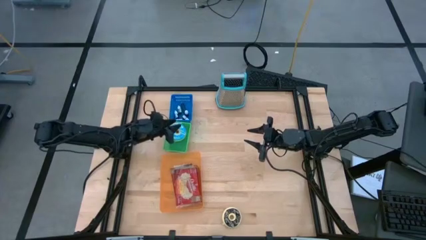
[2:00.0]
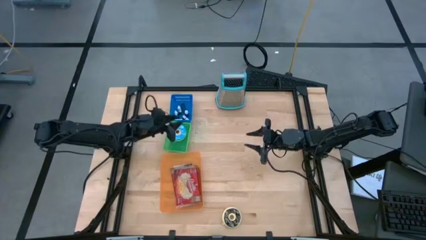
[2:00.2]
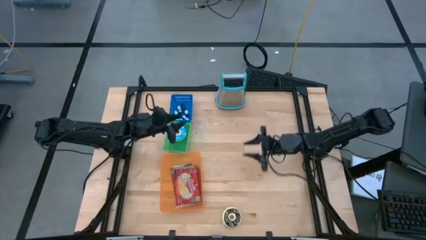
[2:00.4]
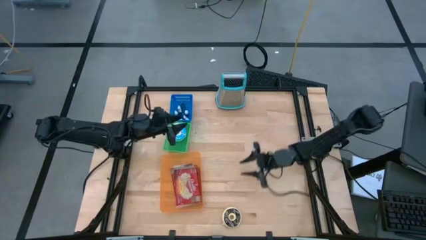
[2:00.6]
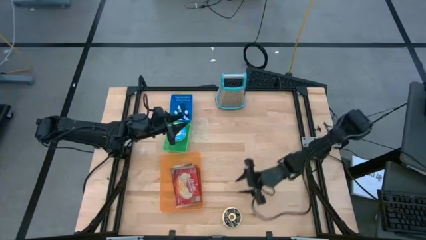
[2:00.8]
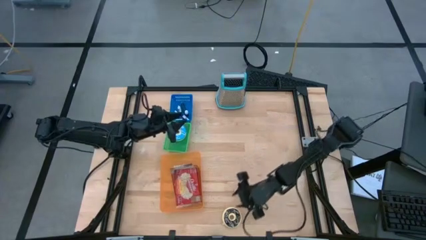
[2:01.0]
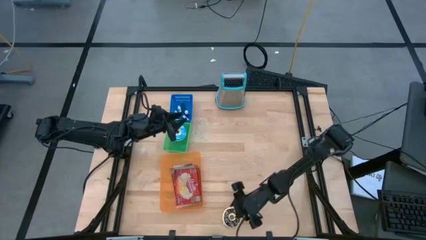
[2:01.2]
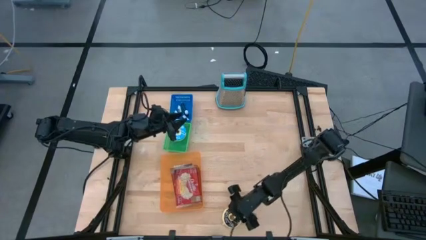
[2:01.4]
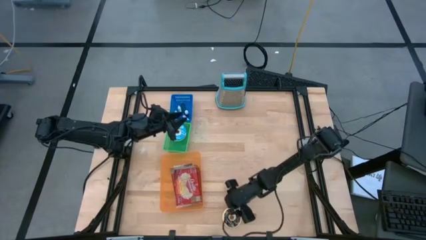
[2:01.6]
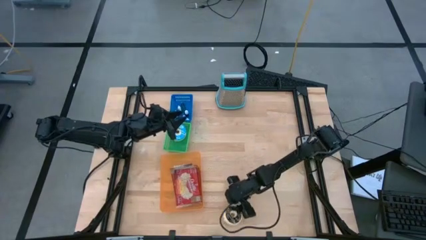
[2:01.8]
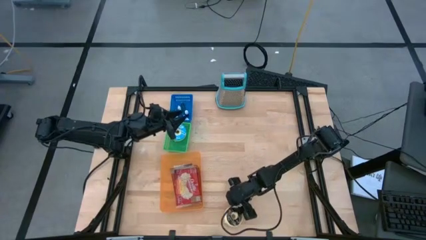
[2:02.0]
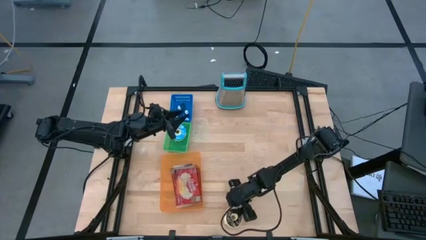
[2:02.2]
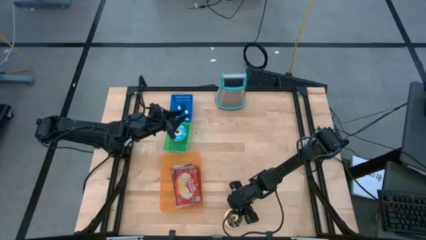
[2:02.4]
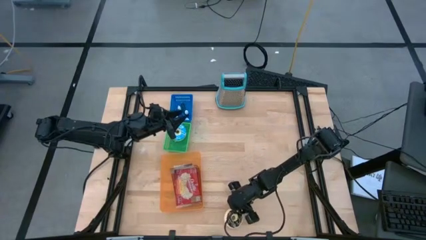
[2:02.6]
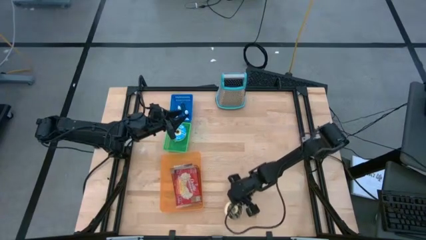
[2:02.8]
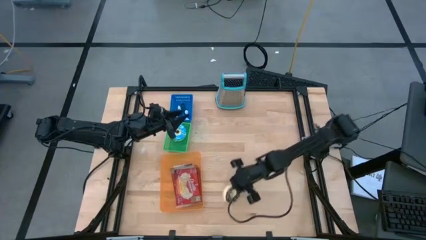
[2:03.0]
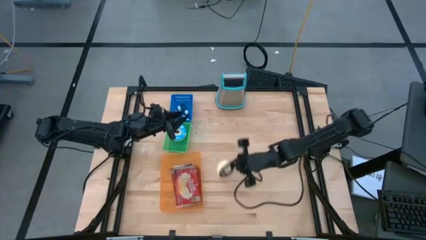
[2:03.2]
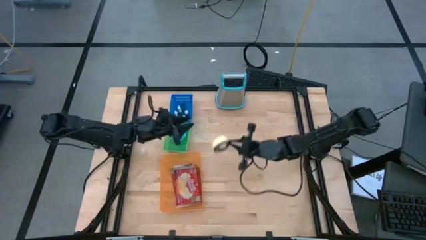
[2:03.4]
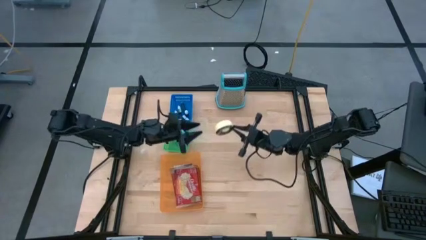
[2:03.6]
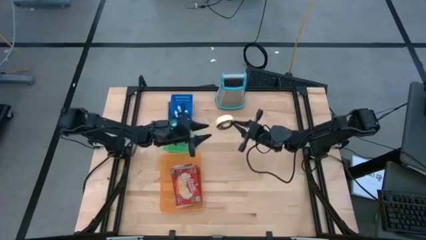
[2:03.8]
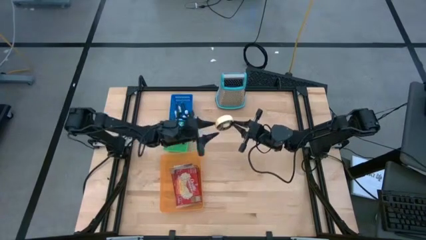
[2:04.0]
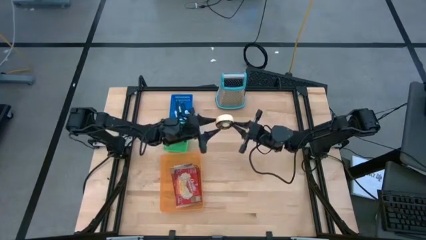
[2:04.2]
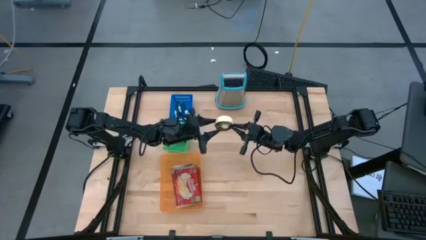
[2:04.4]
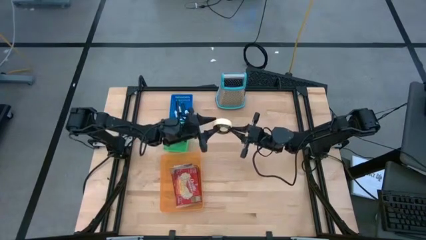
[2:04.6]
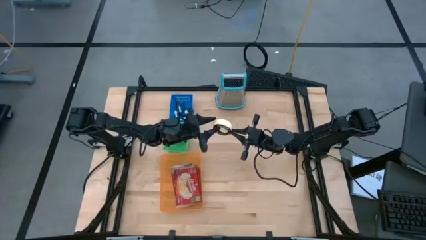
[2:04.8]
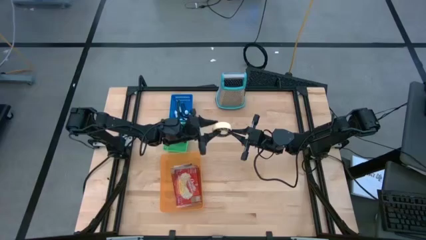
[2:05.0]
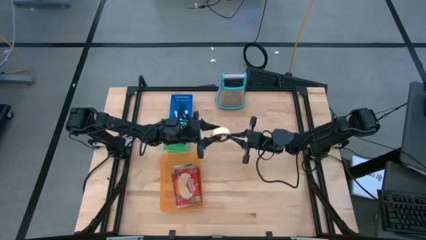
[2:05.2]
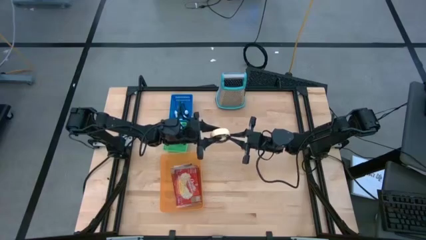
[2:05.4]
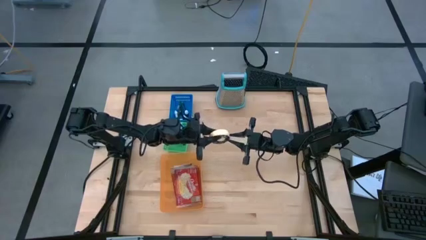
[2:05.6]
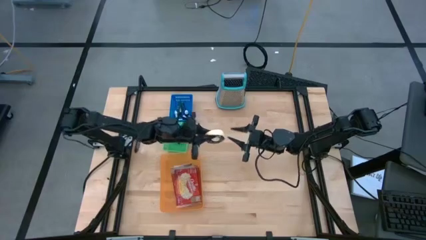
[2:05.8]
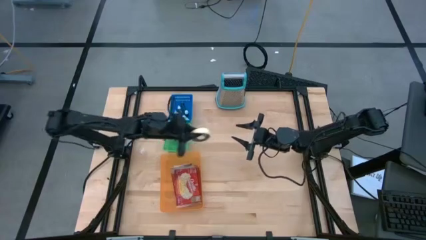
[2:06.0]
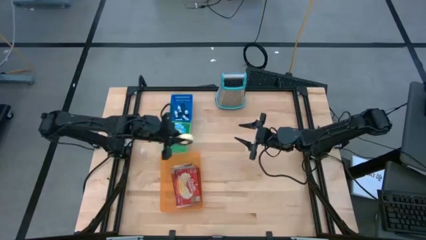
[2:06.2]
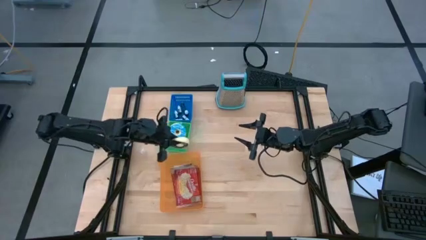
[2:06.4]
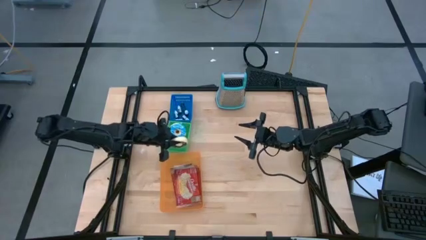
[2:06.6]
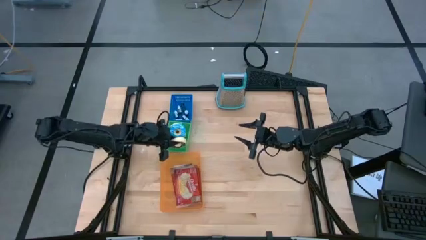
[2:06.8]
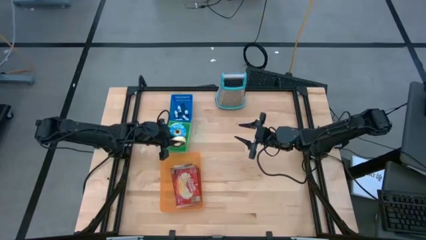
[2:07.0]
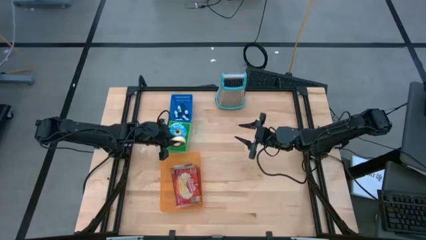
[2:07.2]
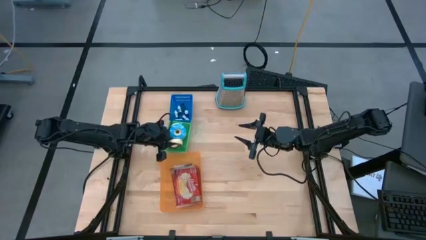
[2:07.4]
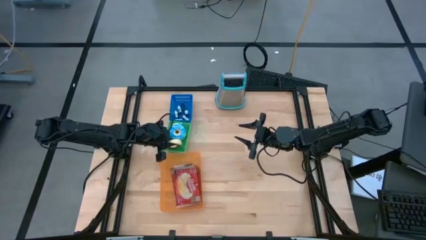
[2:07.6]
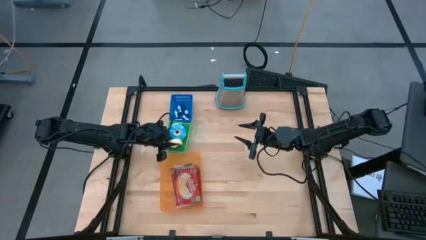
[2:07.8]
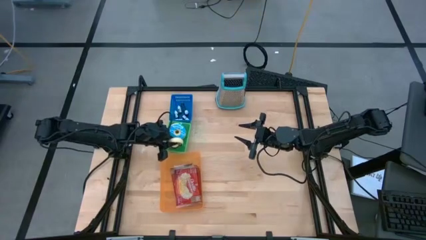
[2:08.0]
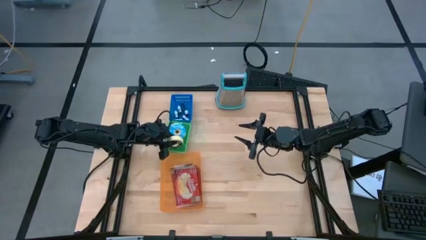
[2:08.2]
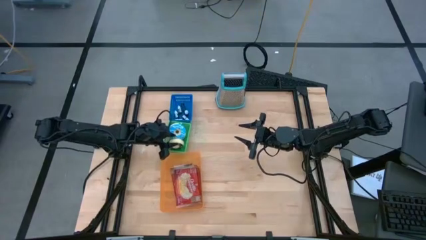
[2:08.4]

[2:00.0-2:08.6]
Put the black donut into the green bin

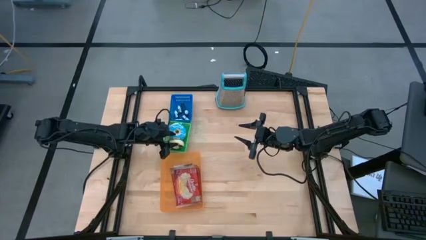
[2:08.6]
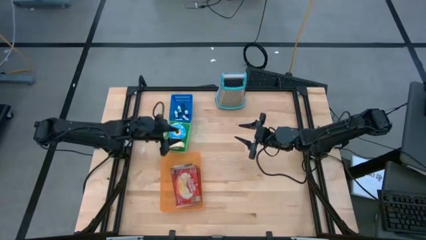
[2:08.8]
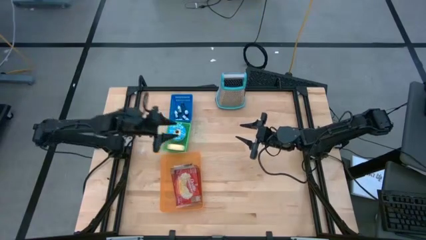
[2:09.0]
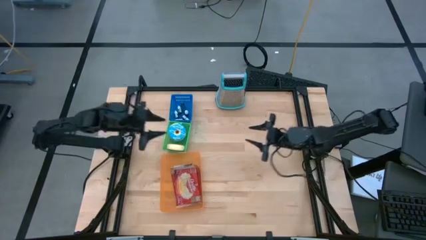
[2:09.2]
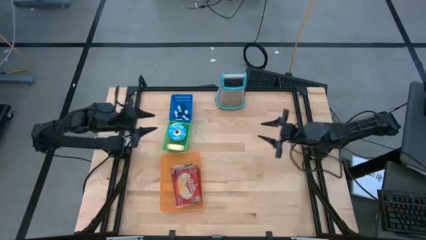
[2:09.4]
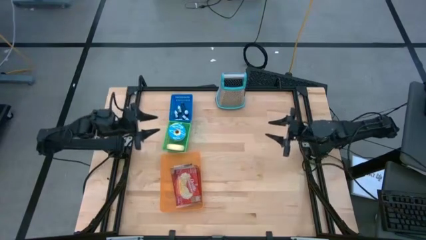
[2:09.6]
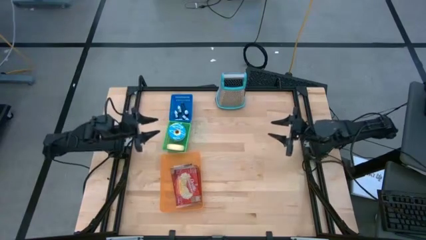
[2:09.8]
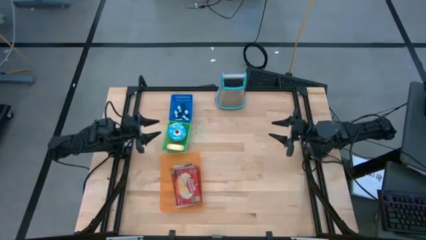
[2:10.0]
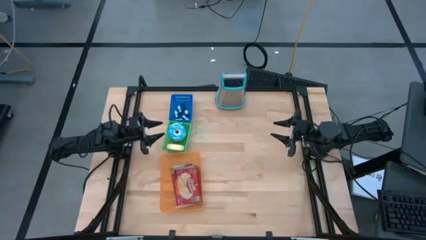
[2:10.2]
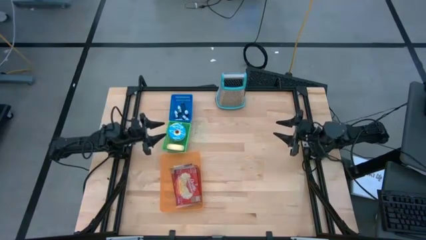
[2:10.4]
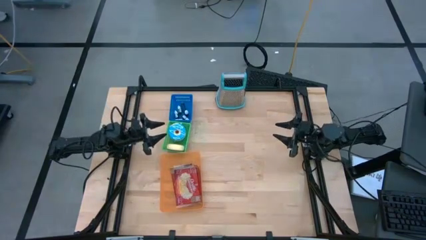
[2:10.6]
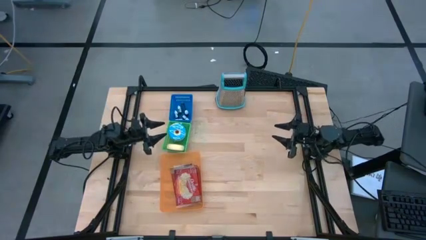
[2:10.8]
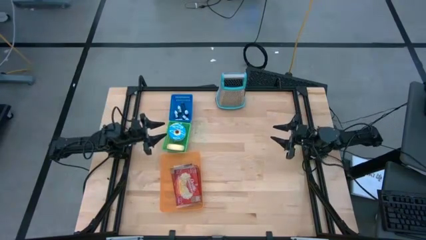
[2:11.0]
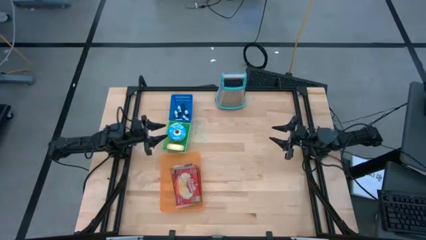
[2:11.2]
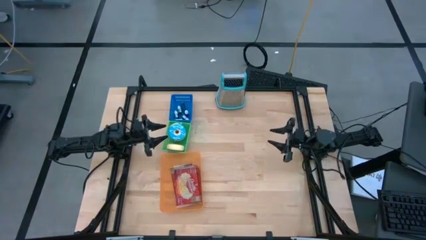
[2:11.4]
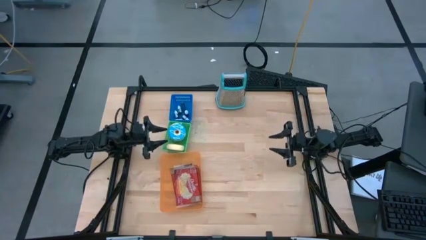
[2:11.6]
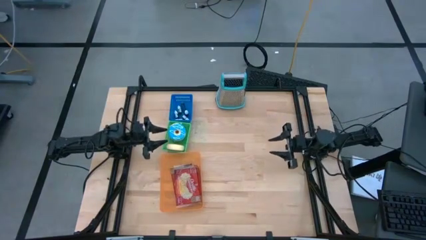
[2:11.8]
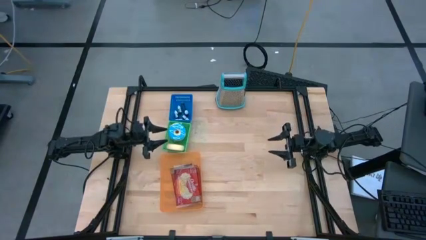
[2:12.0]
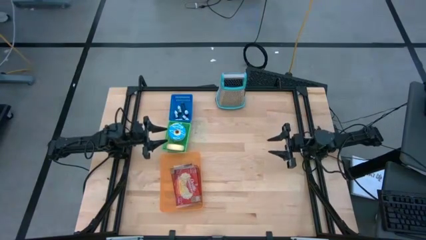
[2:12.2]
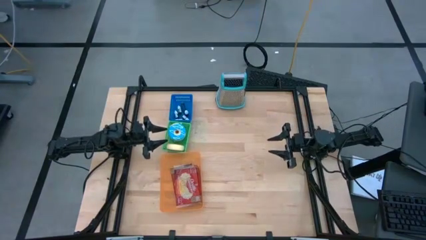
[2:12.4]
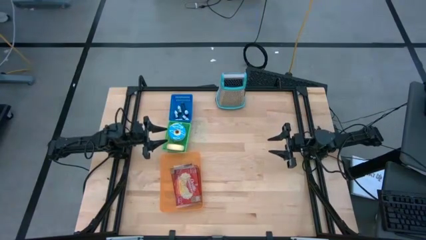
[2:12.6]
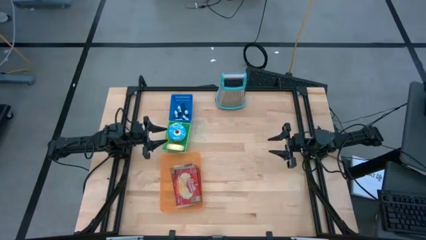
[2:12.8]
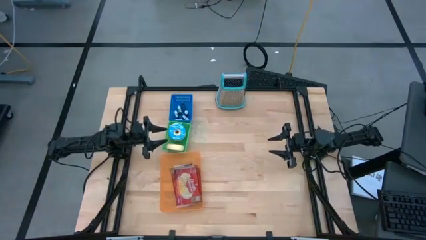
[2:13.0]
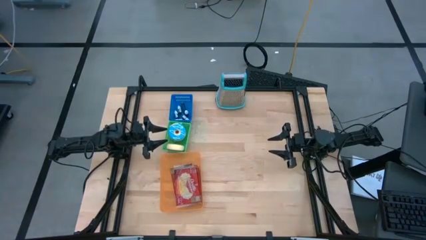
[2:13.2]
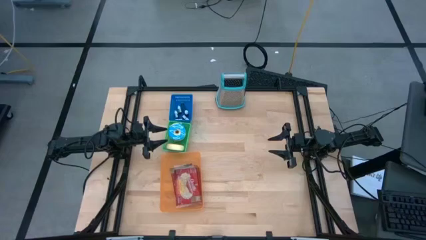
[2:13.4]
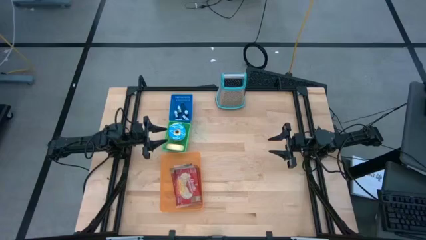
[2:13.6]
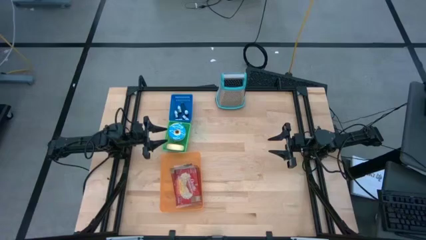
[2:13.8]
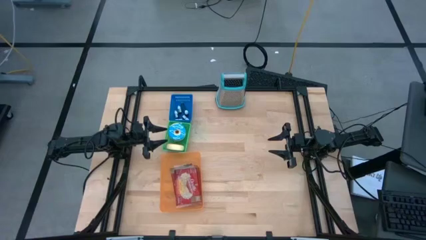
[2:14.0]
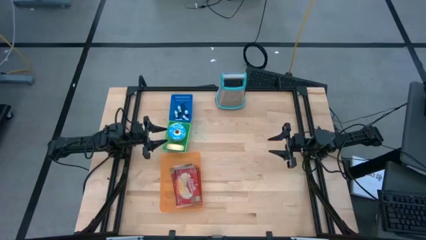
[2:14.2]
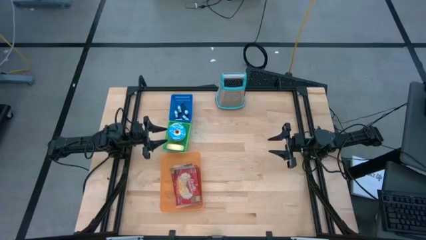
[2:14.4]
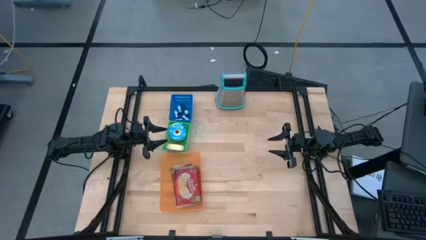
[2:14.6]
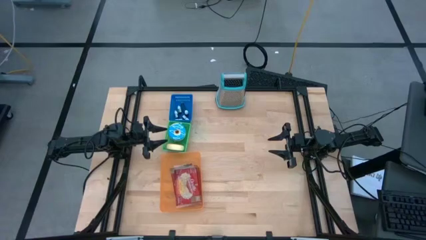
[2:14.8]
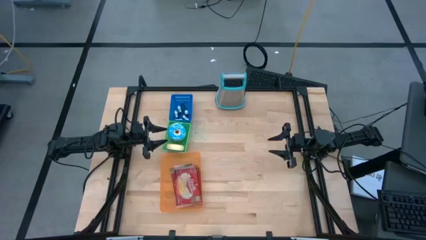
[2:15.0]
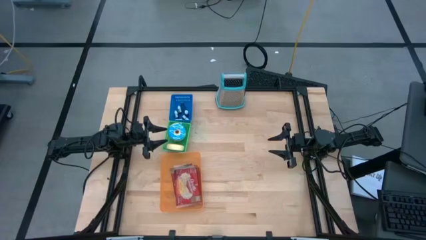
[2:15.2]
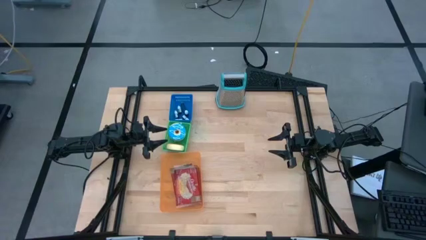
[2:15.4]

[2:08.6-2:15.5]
Return to Home Position
